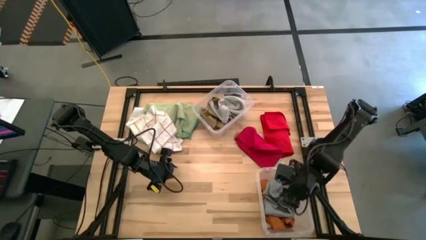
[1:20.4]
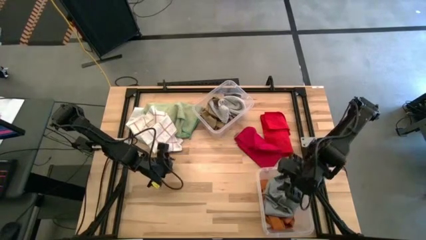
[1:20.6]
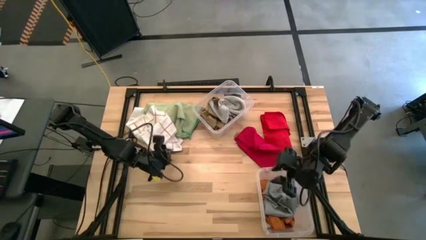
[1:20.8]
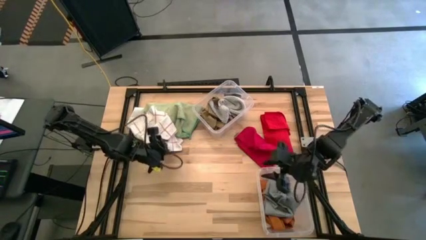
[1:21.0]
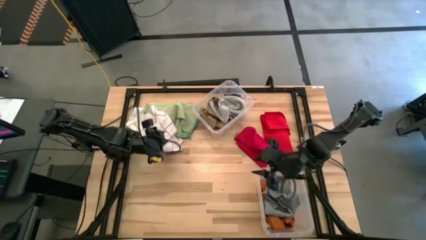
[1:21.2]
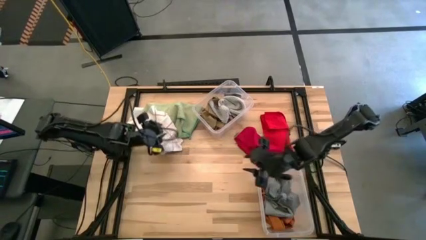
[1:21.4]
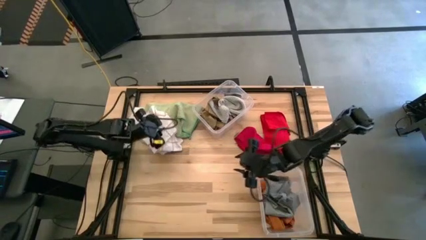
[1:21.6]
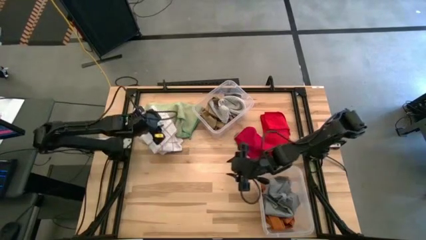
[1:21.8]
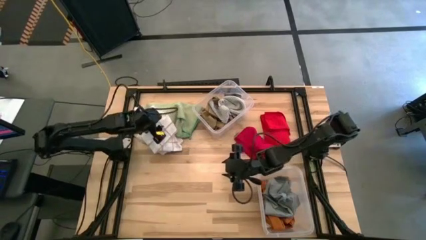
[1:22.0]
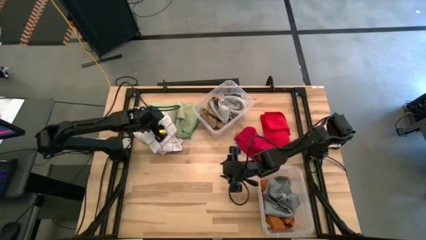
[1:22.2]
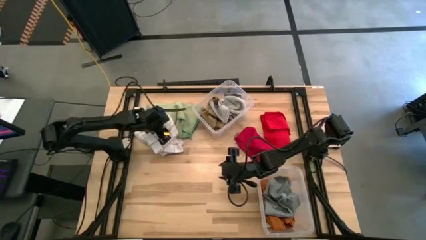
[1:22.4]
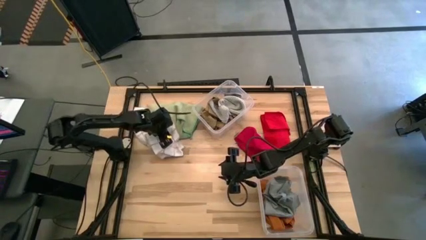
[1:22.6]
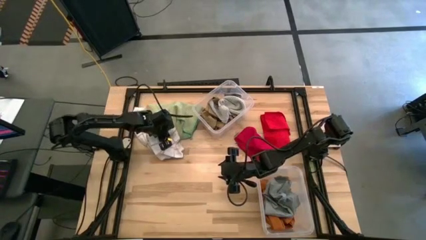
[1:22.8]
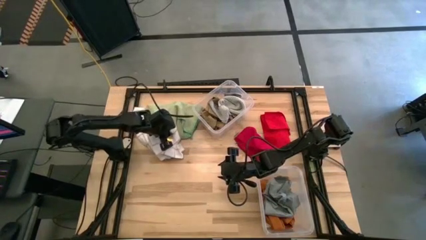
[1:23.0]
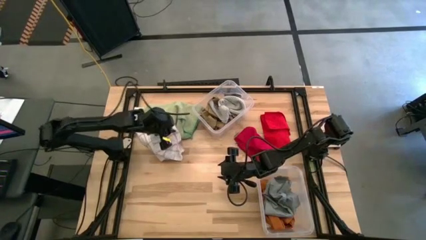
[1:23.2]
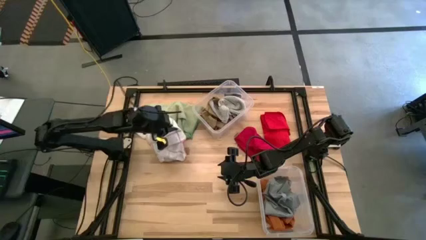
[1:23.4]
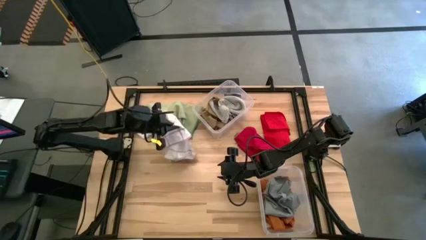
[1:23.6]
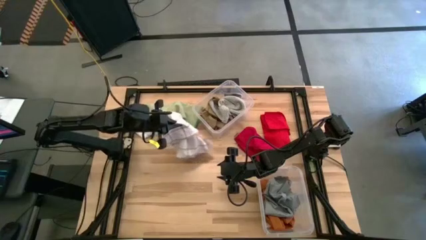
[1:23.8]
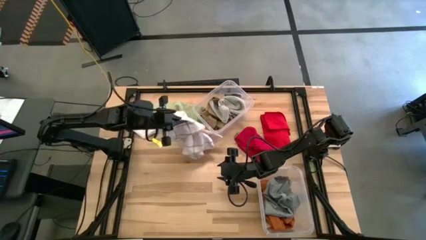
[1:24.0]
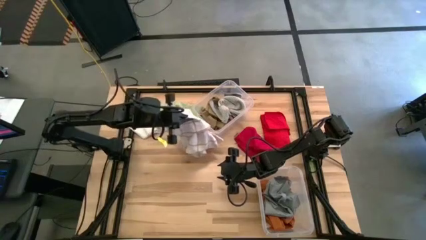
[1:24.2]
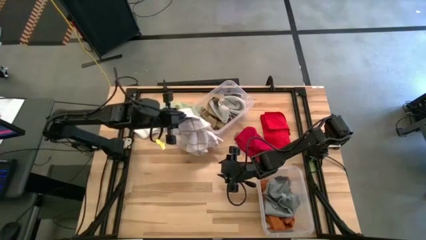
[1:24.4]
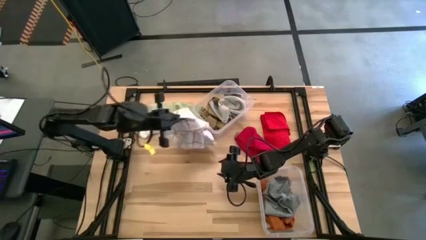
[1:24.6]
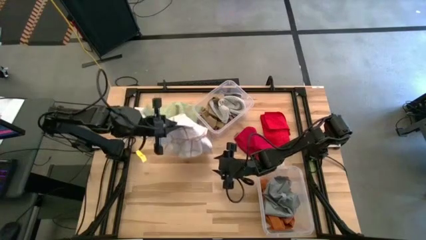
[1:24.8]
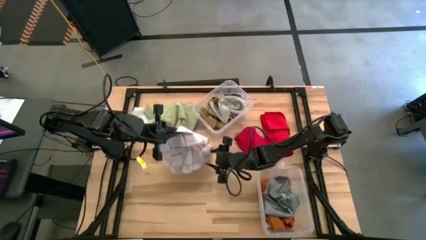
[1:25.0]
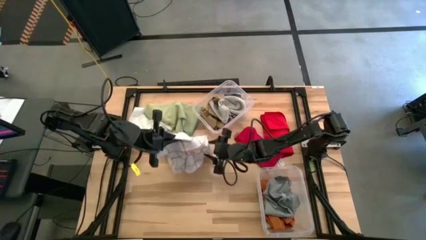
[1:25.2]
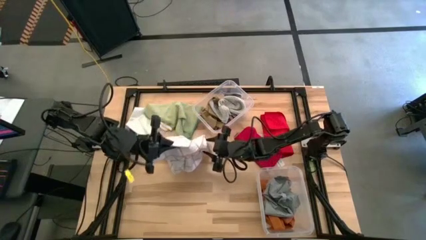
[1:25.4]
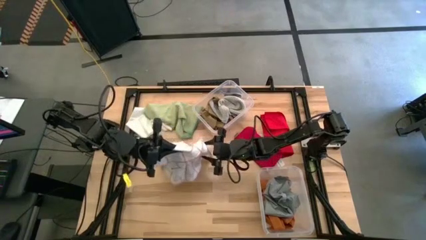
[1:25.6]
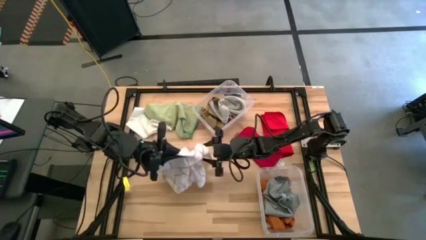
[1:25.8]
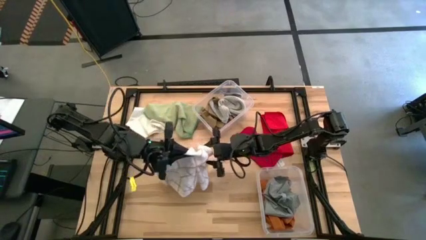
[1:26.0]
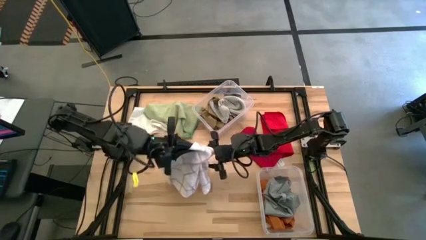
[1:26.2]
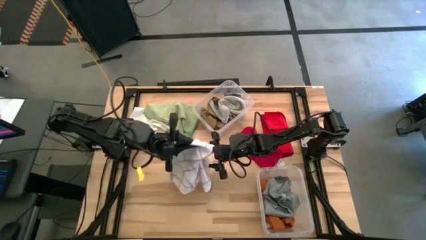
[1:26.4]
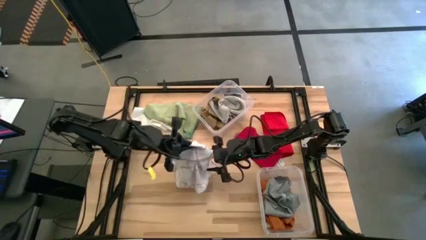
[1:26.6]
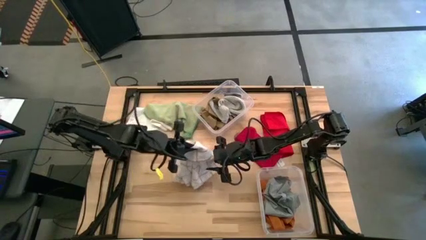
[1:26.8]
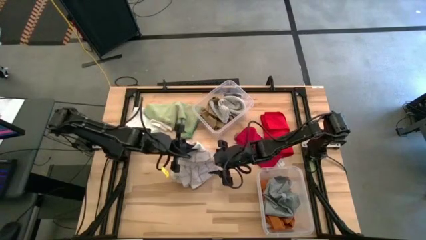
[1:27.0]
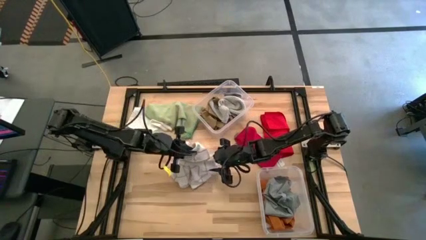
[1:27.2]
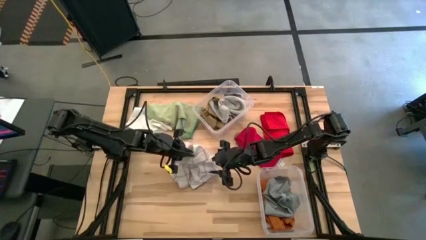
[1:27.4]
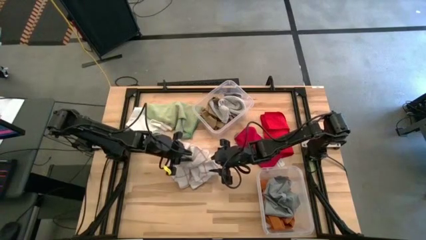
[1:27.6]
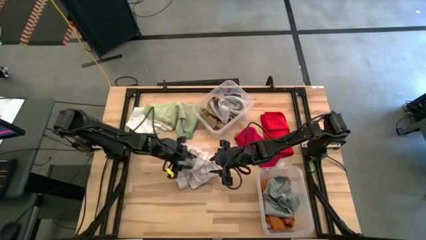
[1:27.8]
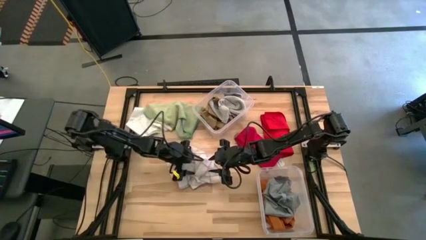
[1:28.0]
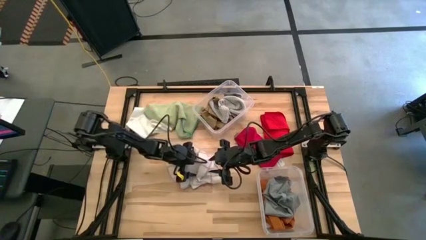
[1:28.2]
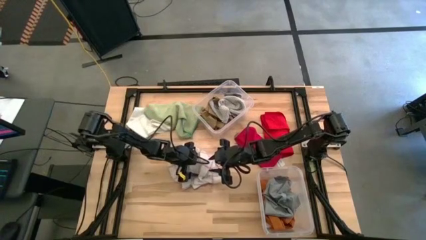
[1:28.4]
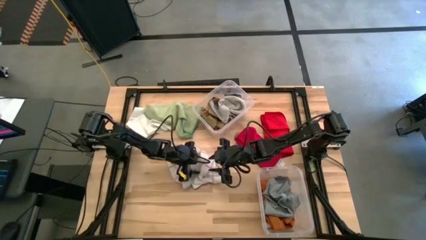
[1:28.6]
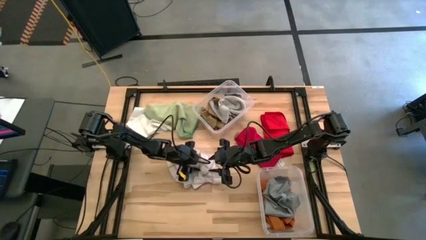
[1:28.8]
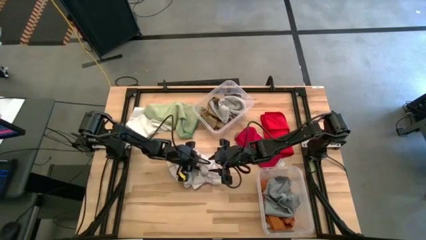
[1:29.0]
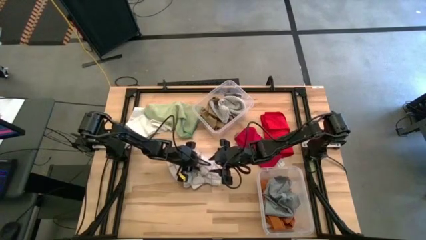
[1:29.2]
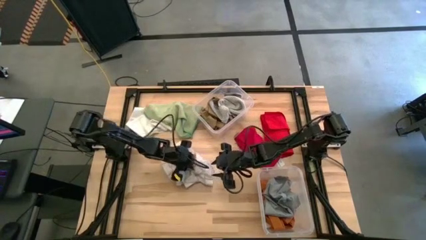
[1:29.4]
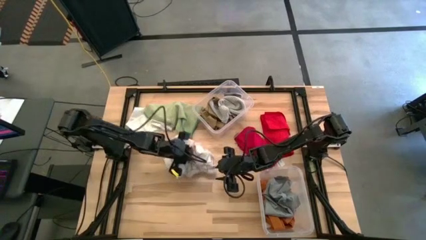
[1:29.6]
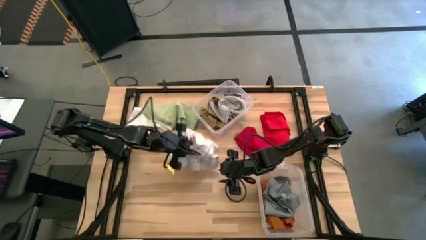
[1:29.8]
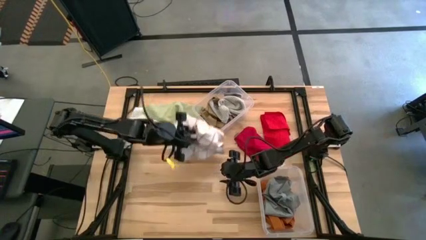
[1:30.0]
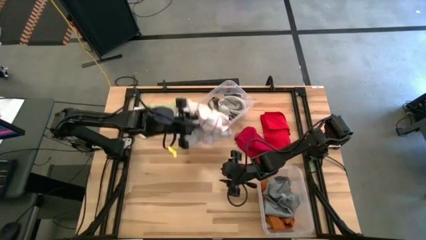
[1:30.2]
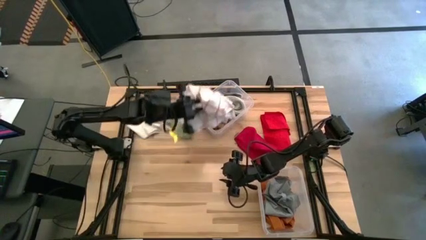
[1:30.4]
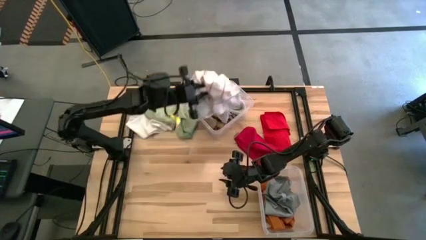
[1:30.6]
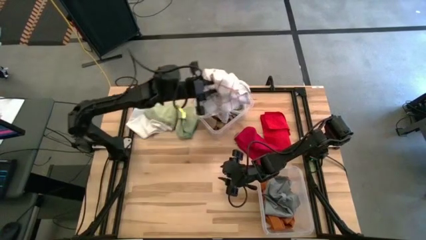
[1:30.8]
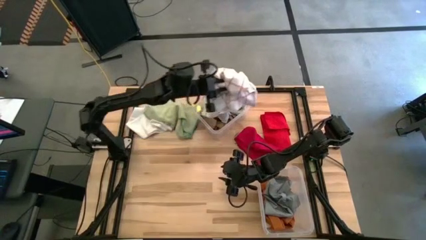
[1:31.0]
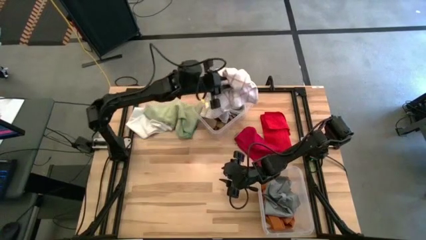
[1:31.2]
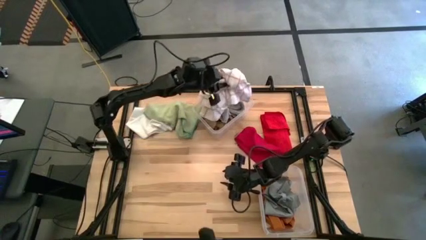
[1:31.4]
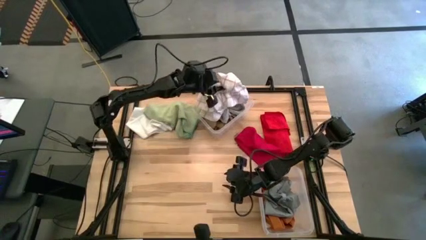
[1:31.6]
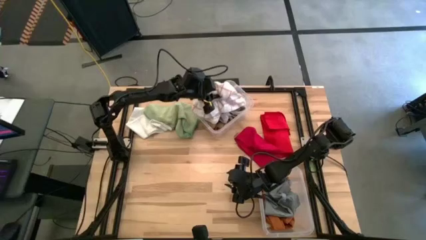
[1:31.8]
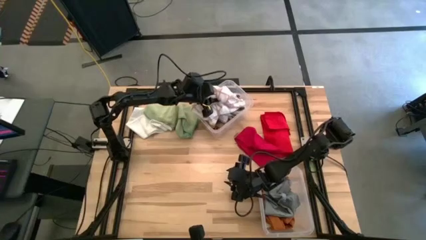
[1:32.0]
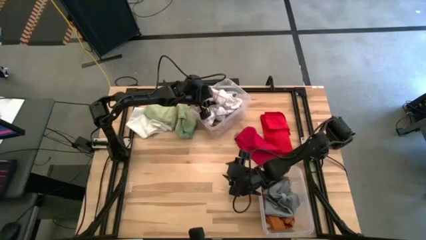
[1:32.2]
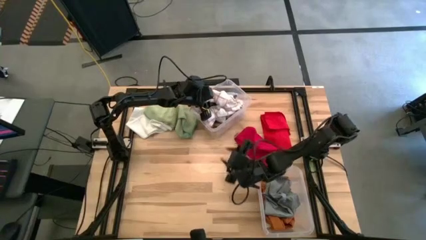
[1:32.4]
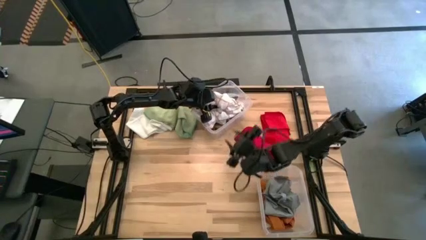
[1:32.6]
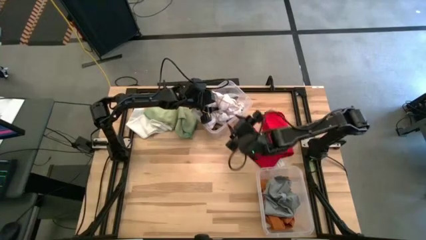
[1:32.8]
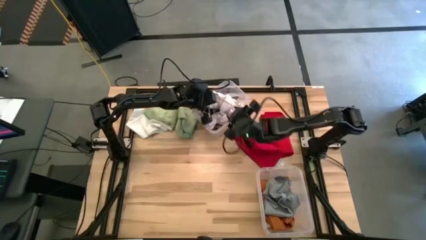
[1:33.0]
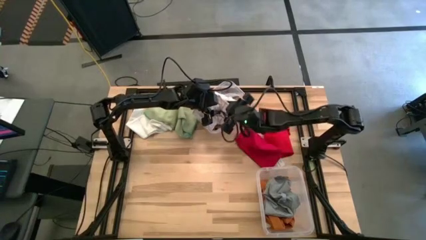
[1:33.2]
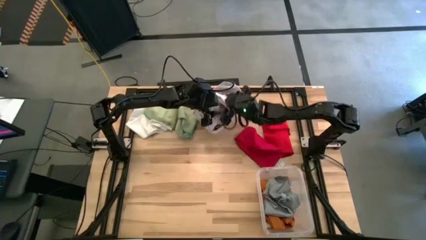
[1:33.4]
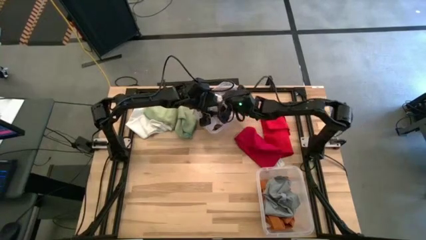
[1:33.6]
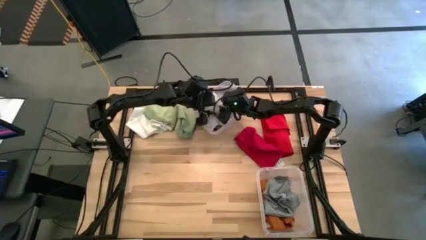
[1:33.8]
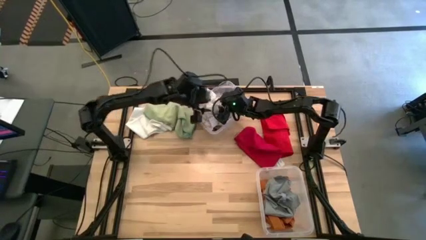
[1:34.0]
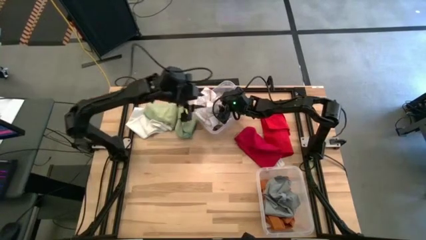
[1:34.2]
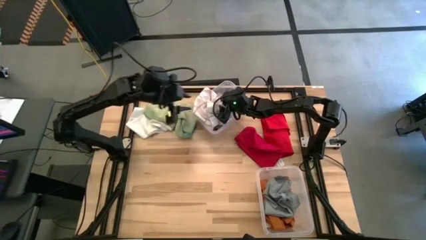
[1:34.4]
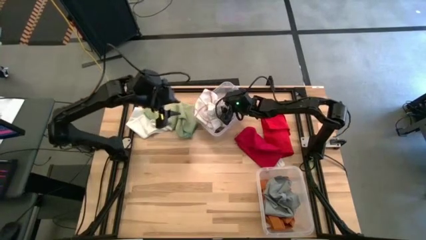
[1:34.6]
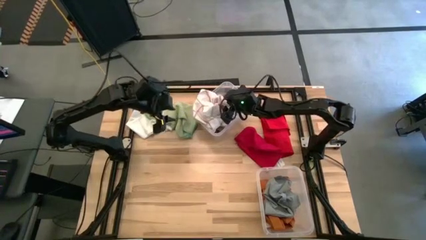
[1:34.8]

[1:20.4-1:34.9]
Task: Sort towels by color in basket
Put the white patterned towel into the top transparent bin

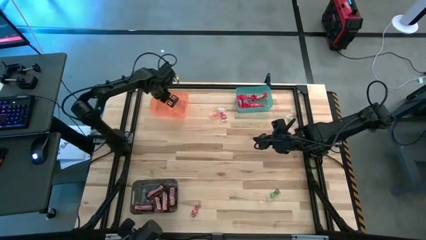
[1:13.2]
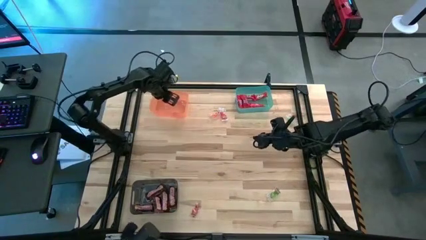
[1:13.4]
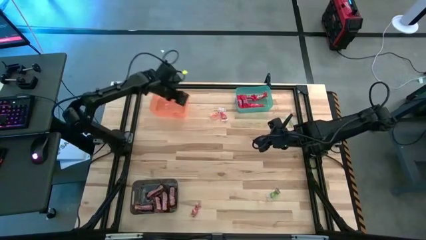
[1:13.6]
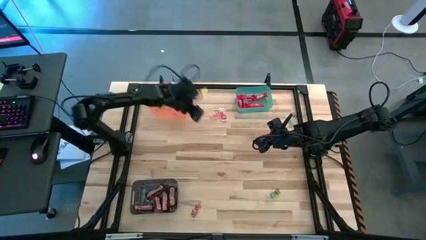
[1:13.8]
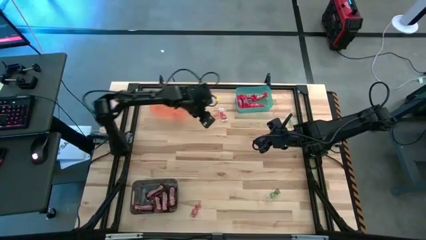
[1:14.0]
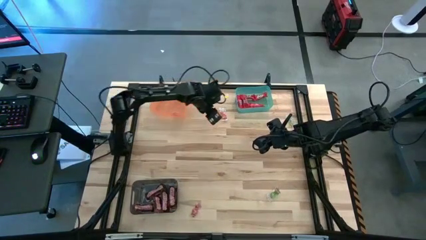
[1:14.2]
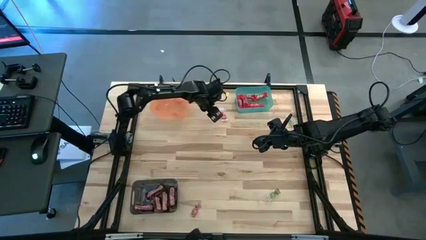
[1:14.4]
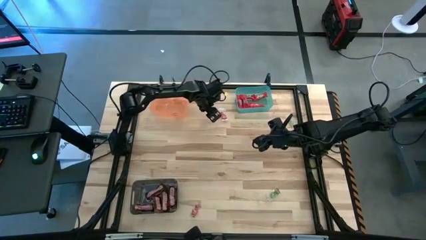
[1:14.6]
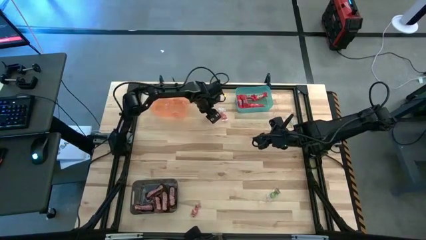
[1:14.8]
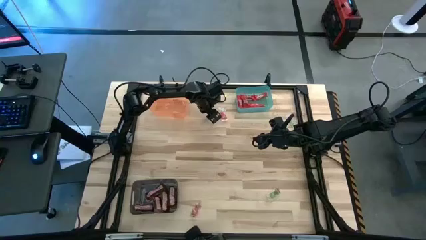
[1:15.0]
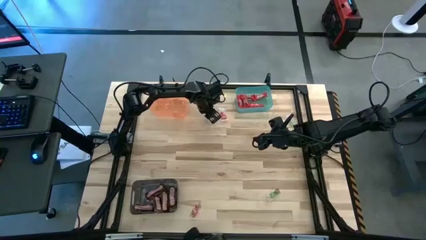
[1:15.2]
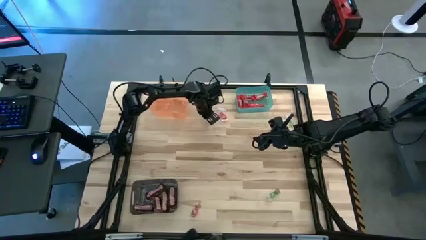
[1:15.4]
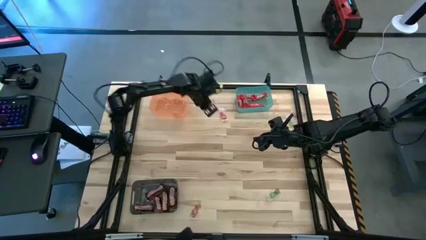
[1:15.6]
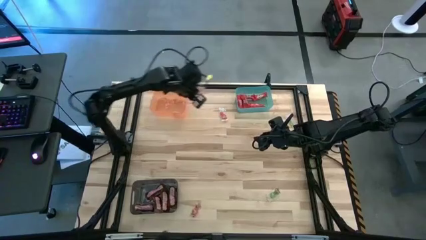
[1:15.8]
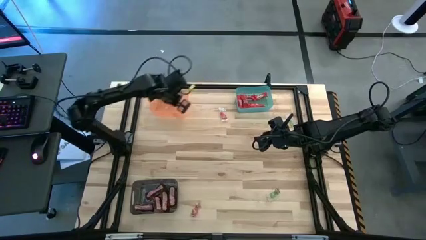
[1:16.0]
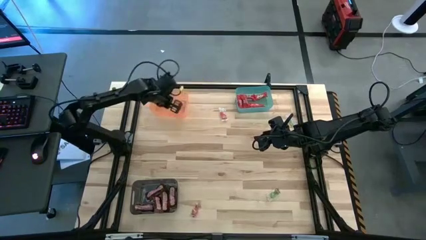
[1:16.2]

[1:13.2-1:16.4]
Task: Sort candy by brand, put in halloween buckets
Put the orange gummy into the orange bin
